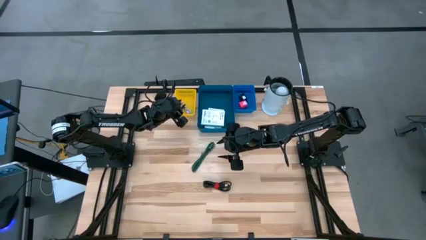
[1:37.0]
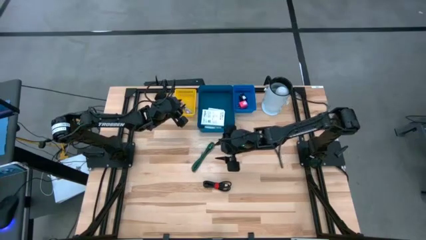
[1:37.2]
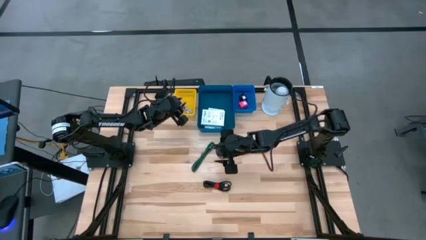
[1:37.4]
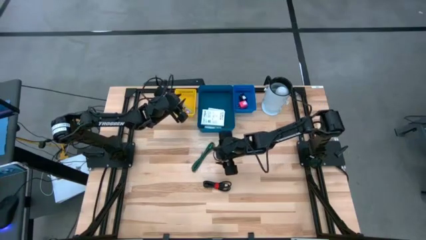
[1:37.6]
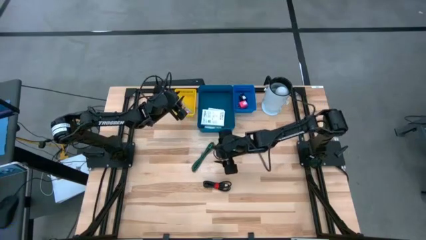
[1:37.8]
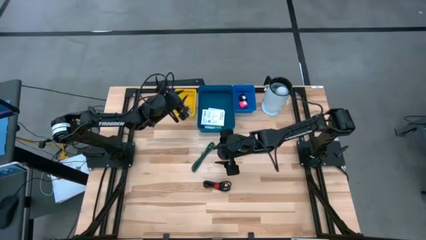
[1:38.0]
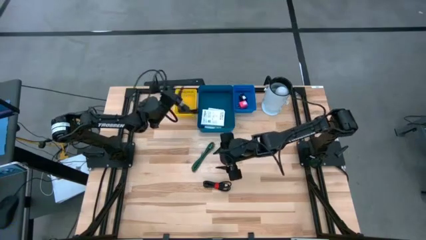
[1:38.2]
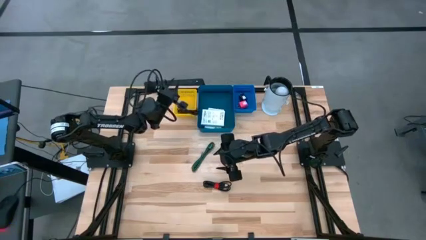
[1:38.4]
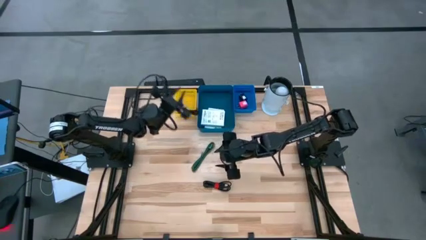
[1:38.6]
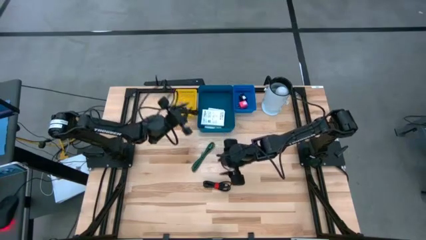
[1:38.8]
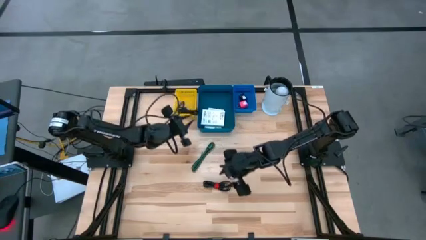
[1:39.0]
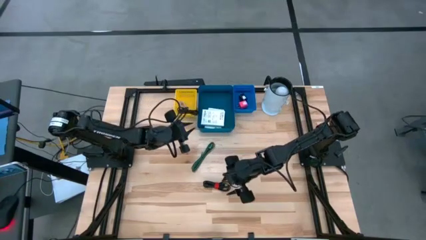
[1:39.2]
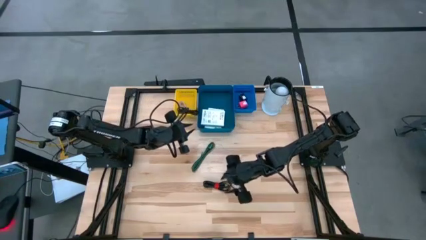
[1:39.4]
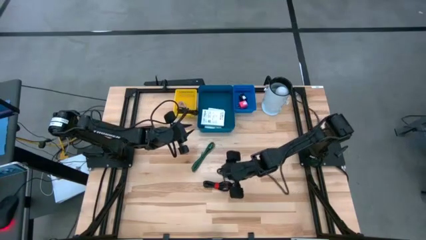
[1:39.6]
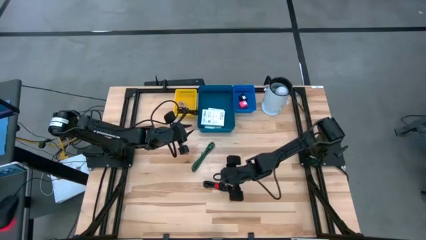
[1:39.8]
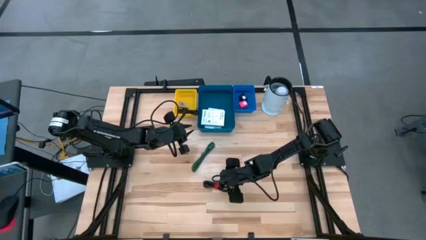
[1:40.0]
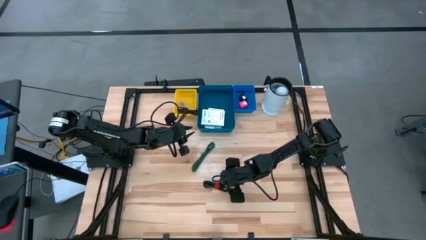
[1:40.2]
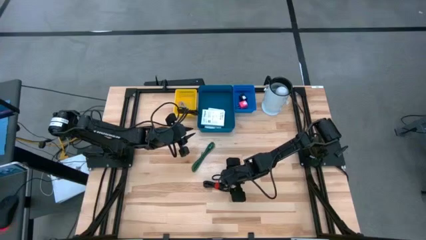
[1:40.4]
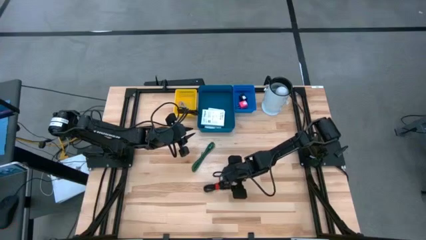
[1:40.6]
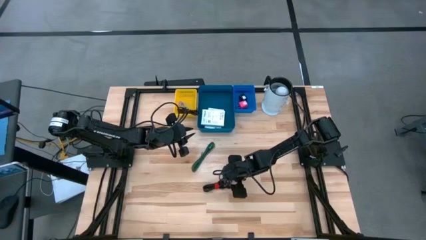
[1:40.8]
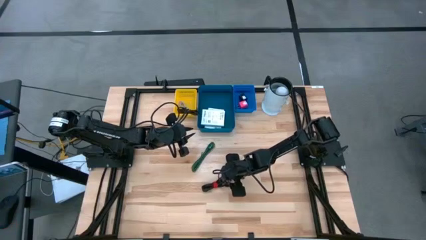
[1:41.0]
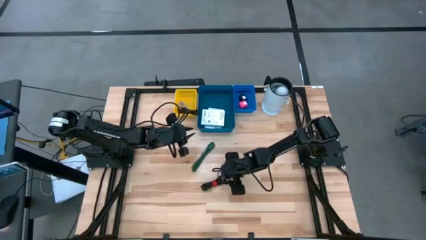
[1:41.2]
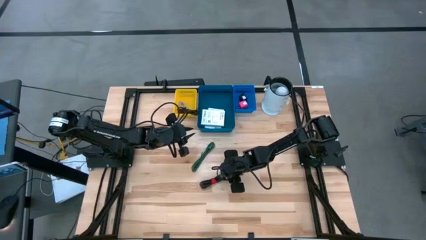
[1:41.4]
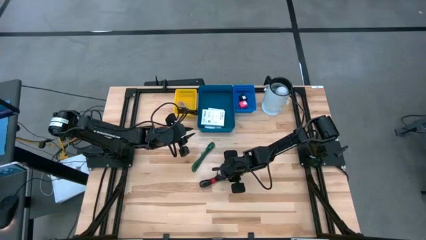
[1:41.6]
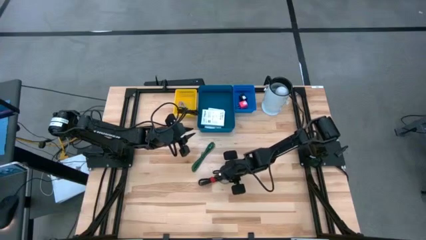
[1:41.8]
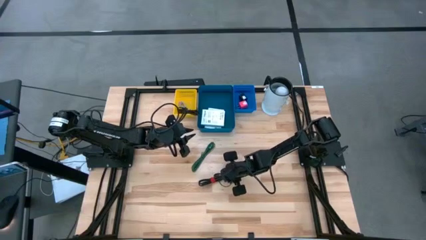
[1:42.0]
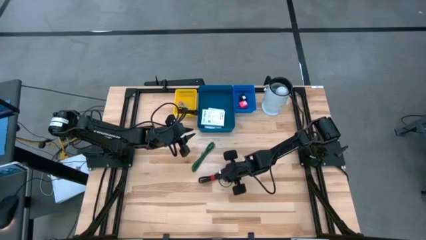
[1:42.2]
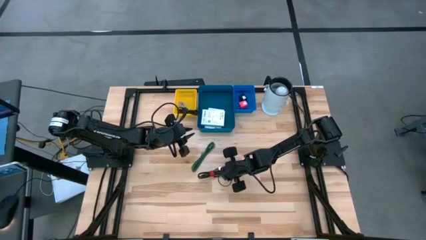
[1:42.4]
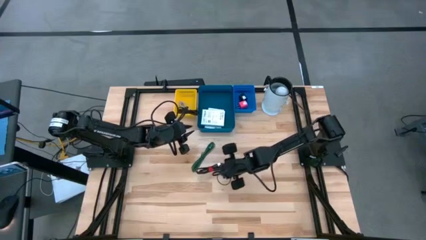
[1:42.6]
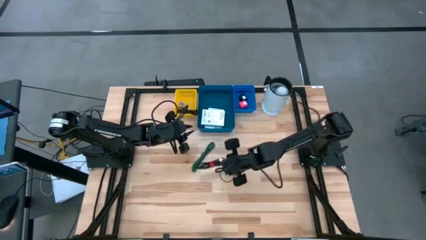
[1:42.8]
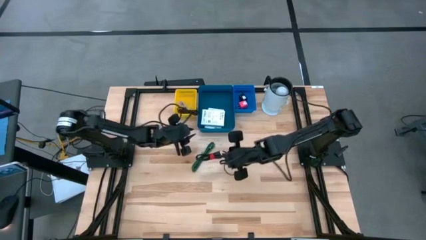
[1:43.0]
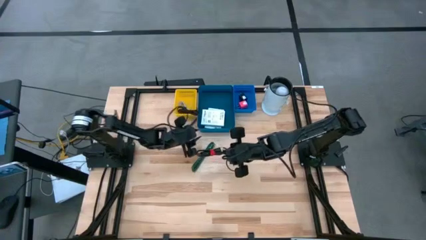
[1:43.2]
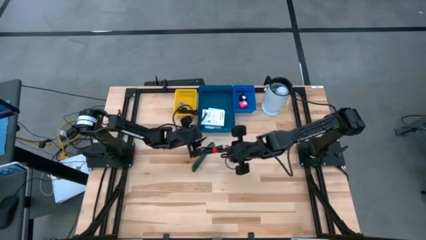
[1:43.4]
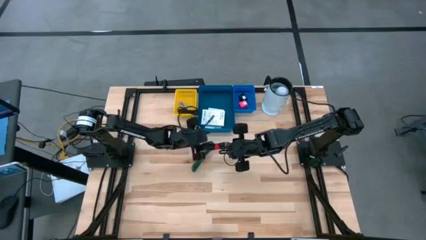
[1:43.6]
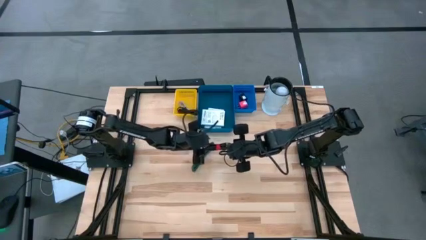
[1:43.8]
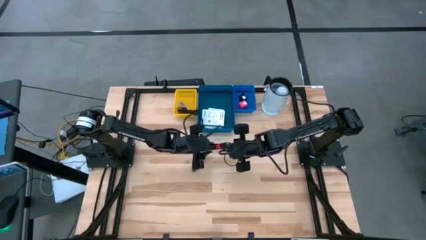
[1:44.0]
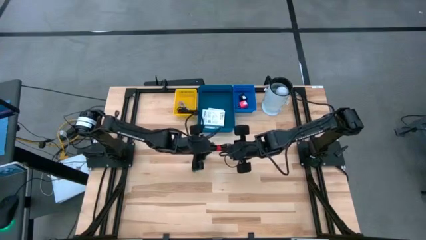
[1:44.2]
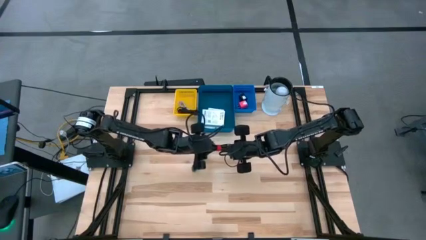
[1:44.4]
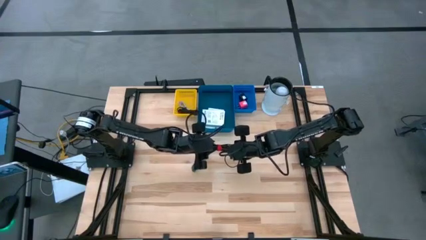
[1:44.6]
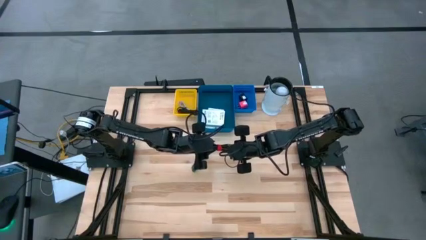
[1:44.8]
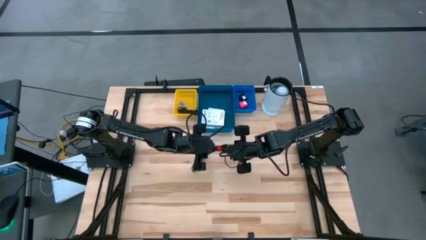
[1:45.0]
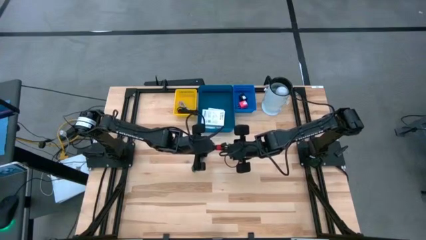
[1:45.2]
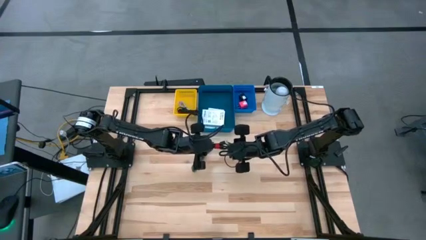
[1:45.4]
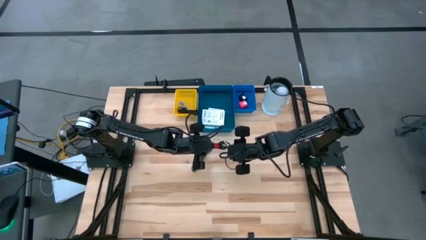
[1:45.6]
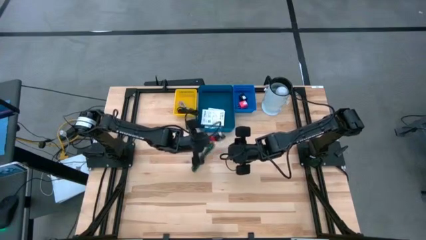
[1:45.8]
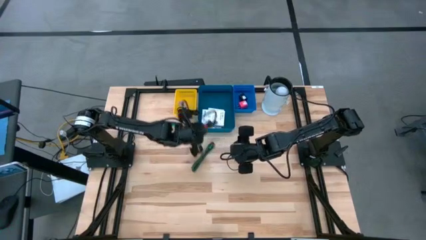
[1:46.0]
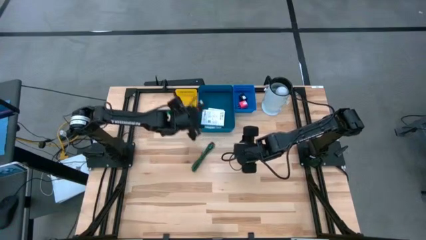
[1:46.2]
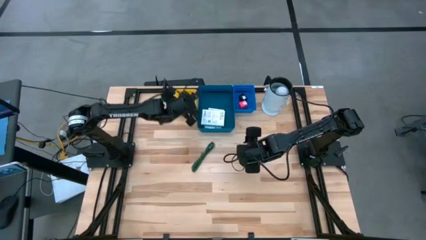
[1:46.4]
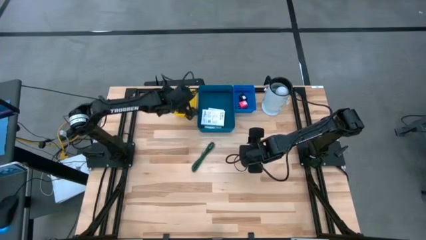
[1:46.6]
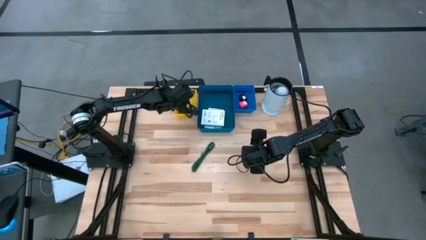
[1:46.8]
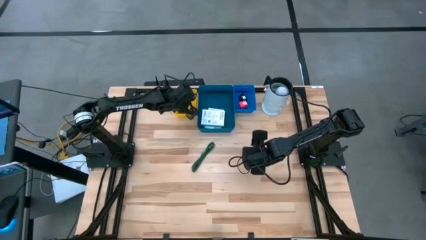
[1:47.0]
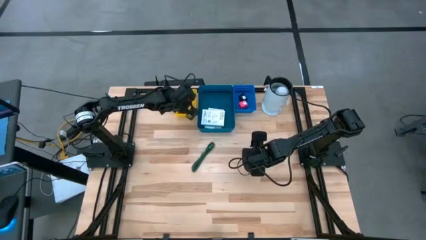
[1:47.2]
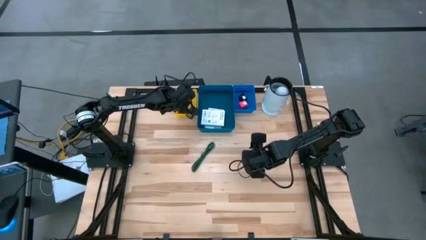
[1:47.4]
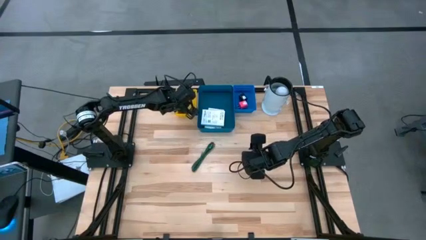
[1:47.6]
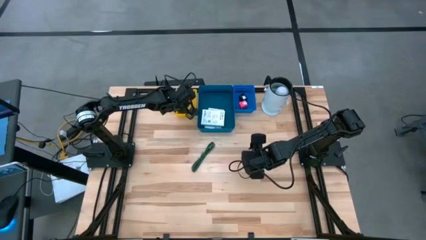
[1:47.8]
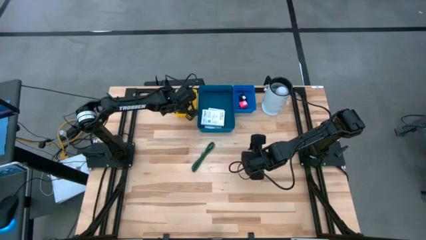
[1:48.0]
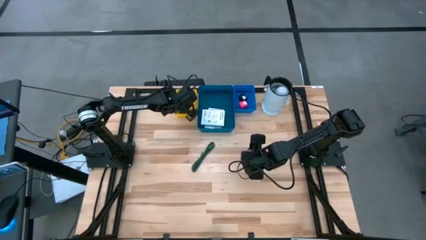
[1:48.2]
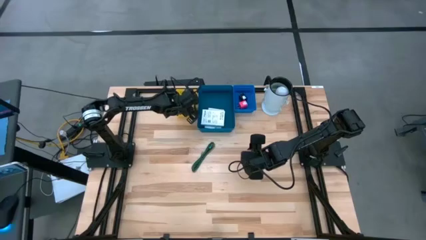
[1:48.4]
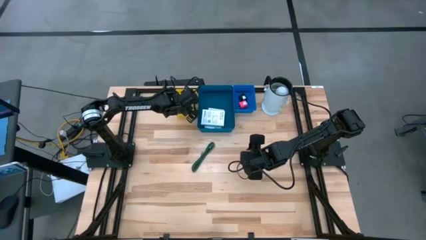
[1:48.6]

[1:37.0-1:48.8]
Task: Pick and place items into bin
Put the black charger cable into the yellow bin

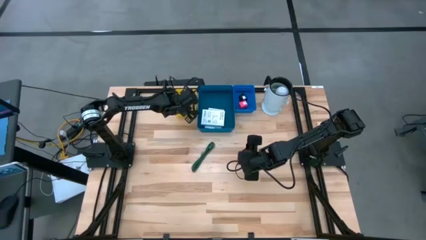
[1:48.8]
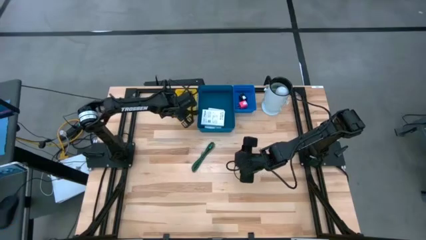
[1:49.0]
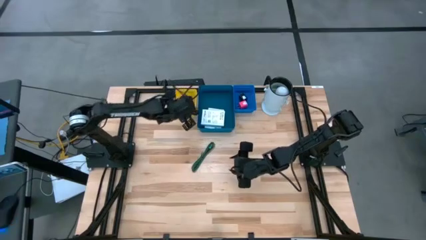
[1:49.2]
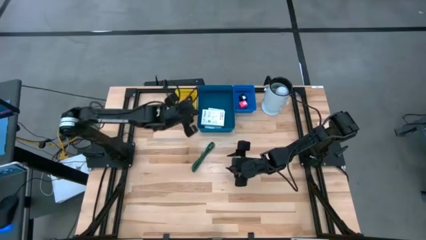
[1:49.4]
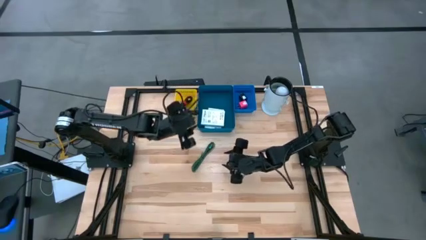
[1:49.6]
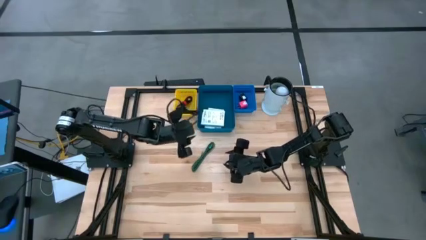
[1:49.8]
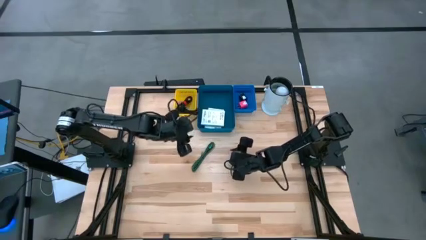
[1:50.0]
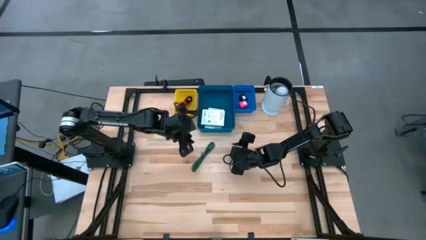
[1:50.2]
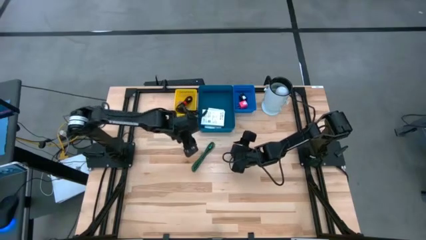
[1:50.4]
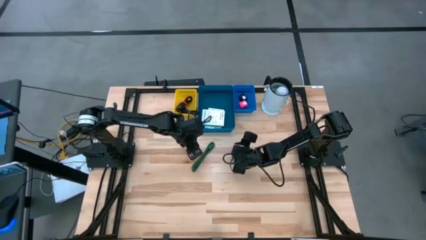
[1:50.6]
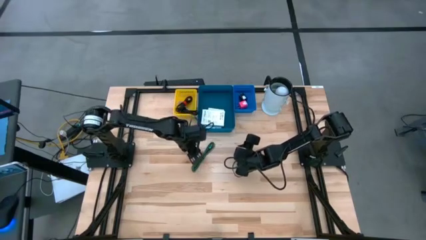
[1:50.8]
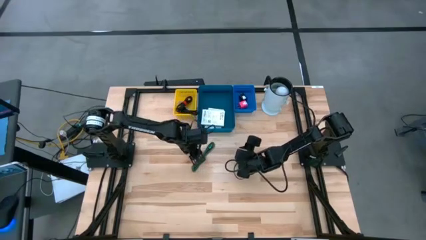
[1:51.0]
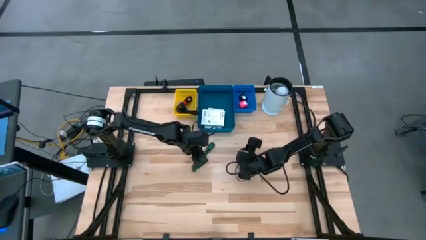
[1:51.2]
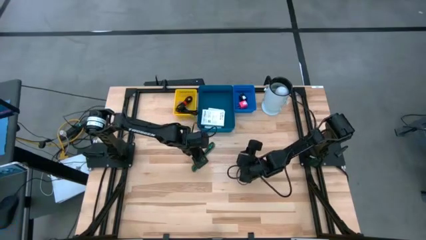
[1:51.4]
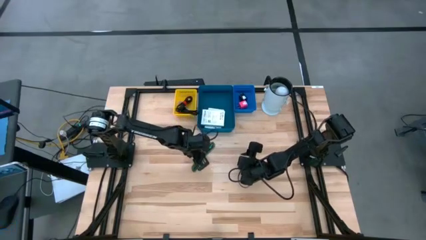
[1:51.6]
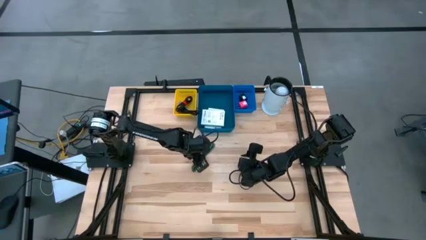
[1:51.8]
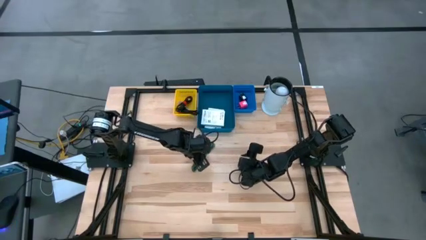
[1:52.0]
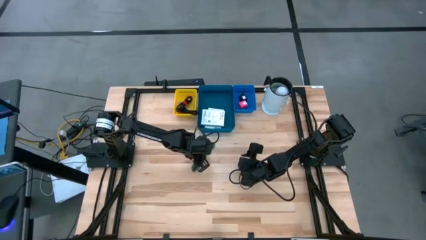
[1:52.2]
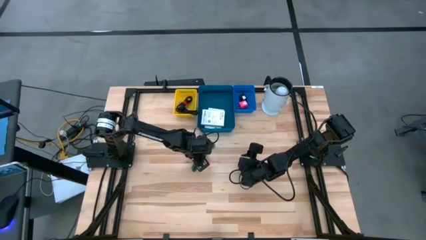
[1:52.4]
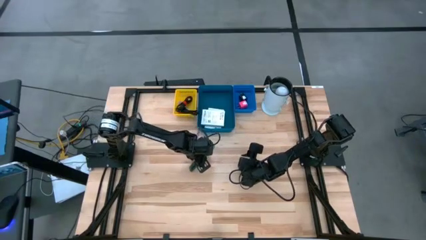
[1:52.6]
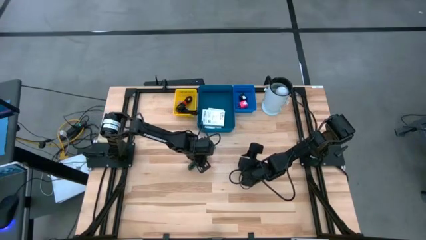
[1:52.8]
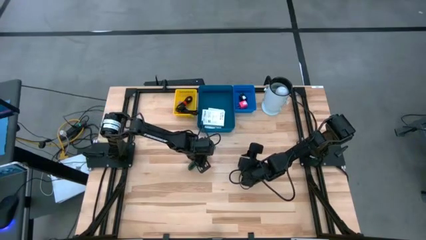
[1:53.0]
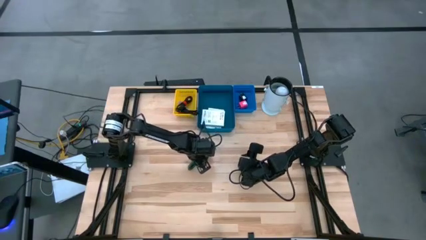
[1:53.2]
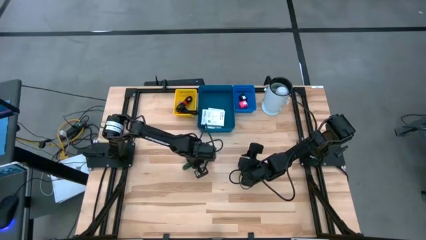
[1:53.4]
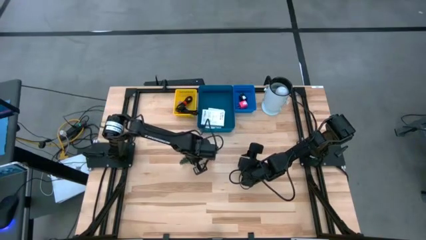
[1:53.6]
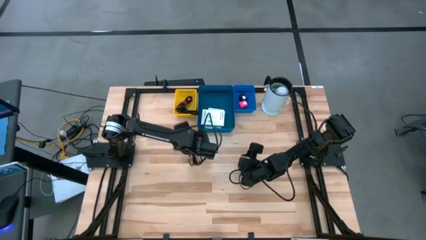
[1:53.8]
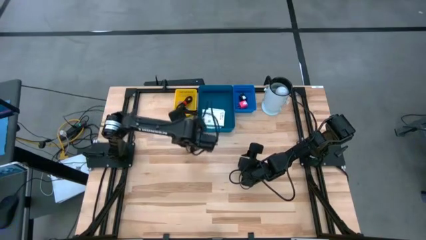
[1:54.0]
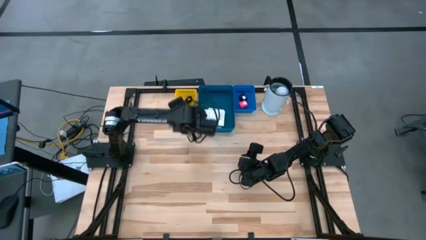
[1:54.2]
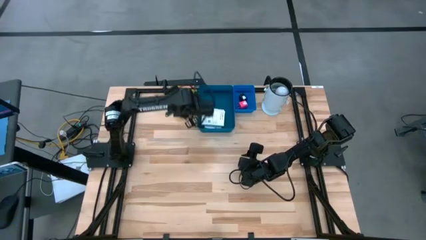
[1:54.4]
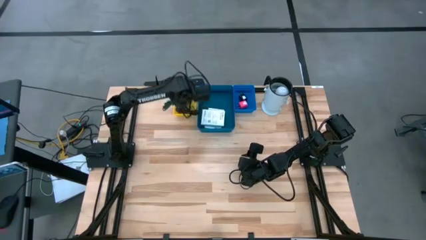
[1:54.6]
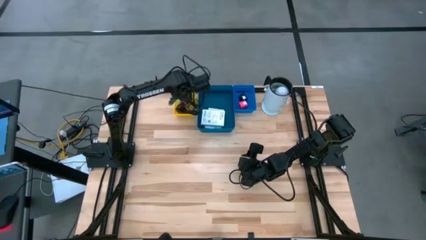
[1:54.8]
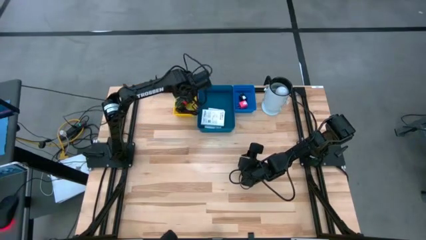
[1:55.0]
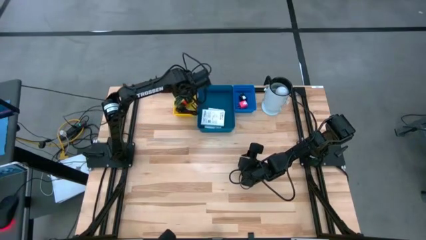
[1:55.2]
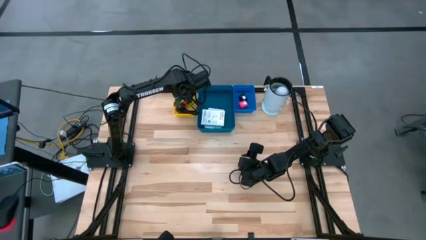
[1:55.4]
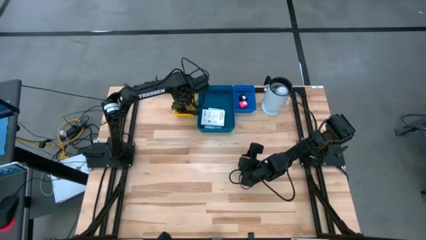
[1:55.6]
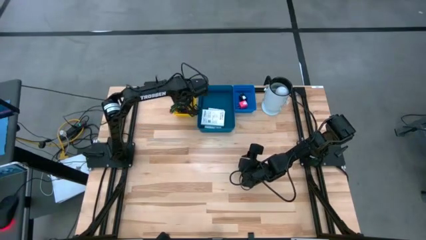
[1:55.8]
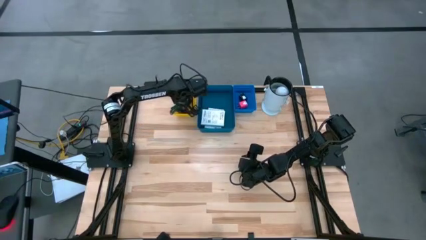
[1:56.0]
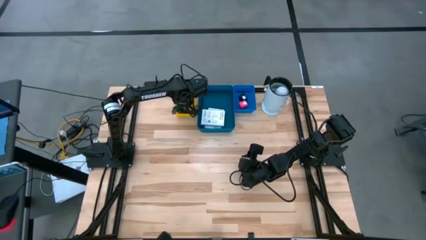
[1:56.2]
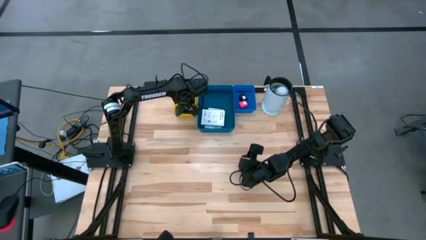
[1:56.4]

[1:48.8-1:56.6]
Put the green charger cable into the yellow bin
